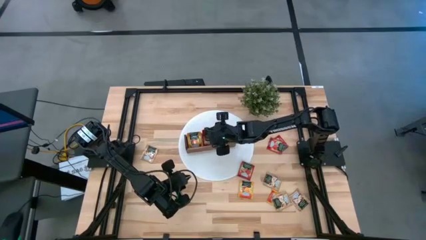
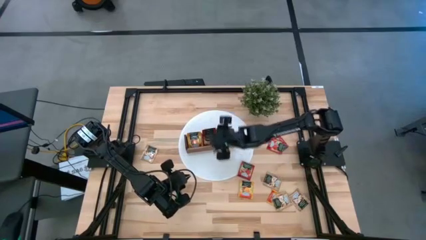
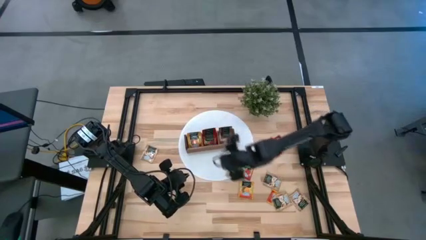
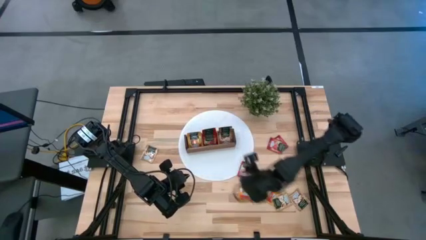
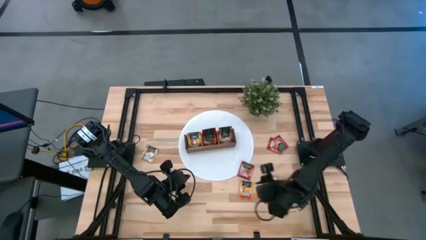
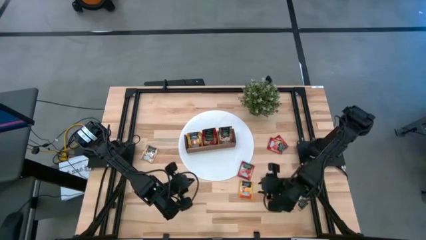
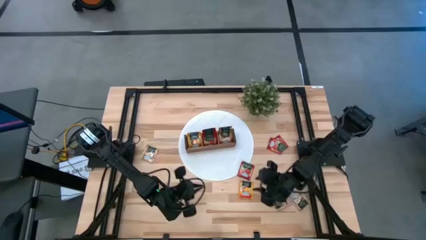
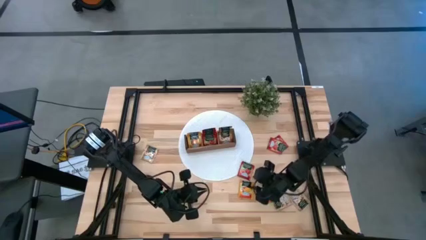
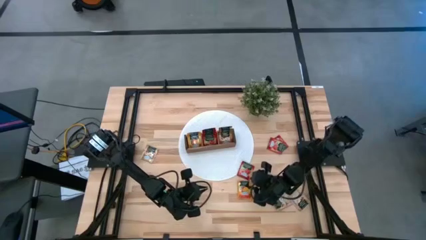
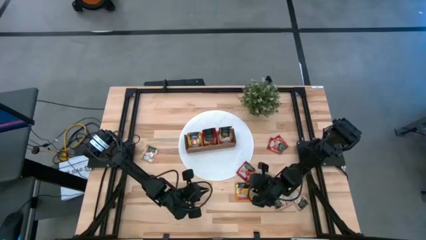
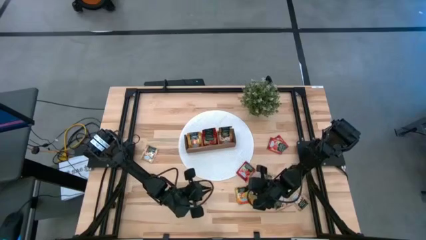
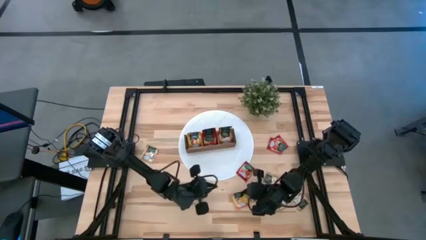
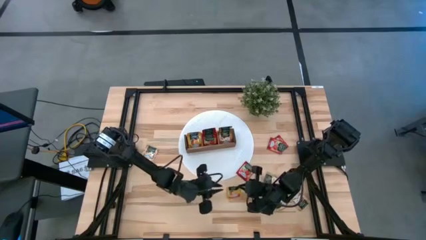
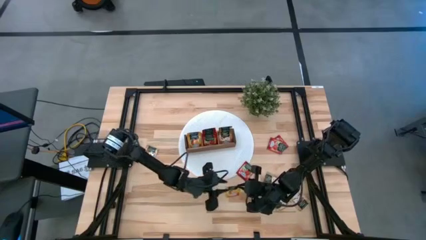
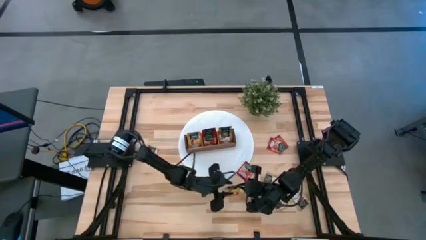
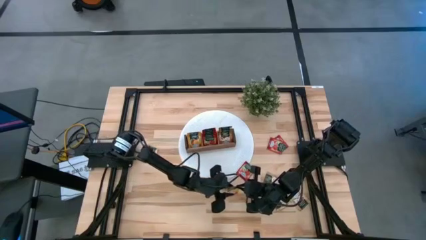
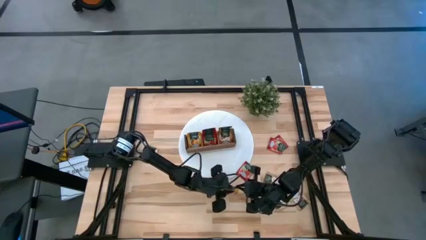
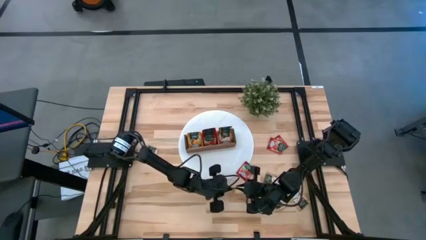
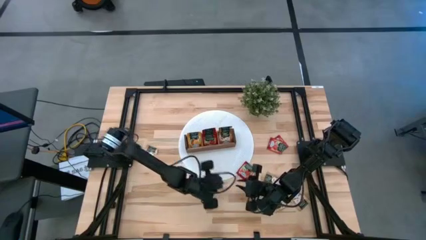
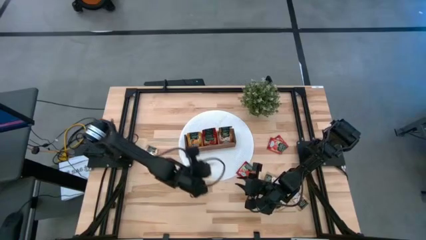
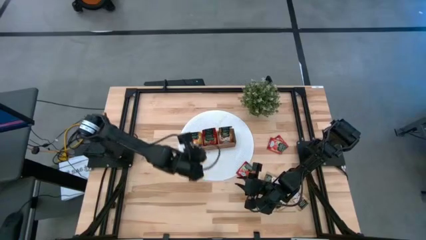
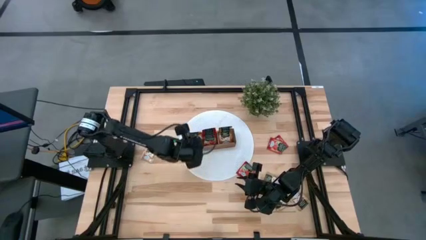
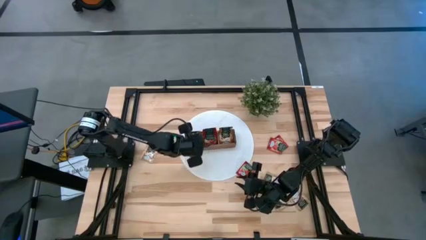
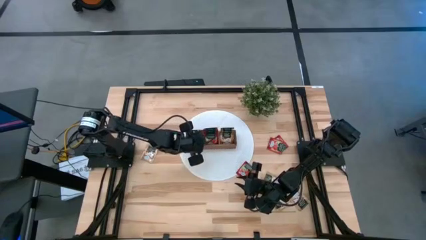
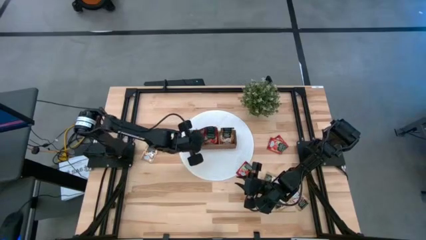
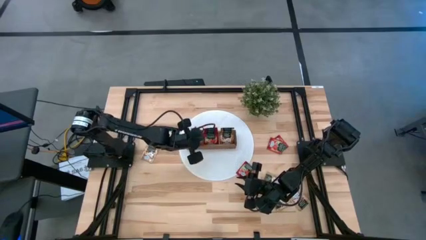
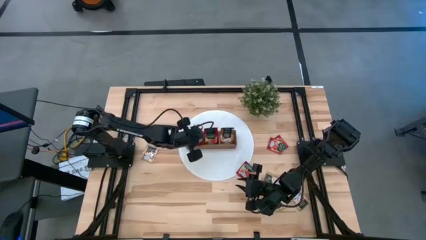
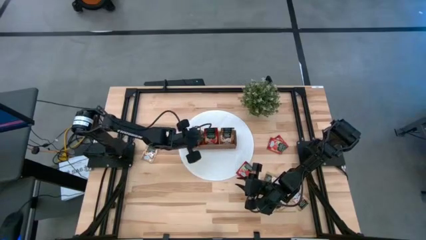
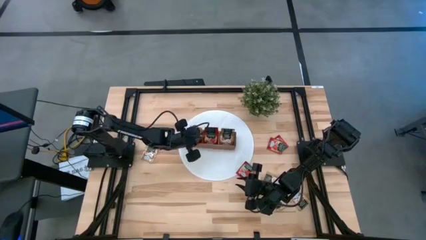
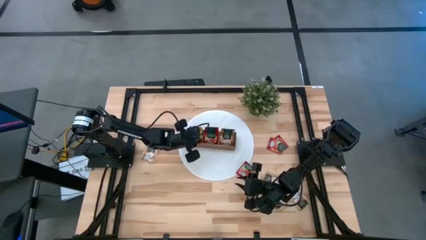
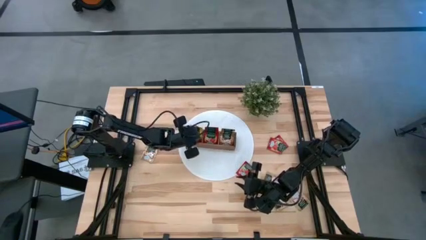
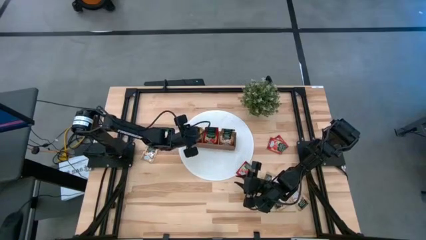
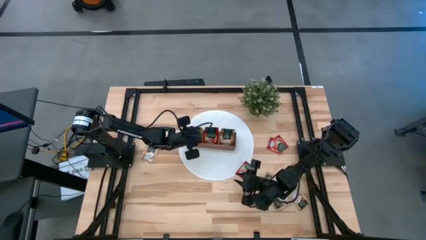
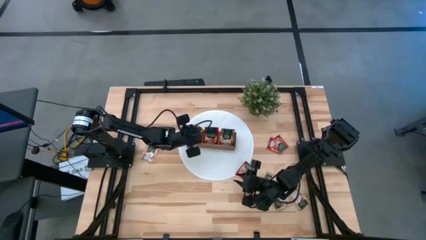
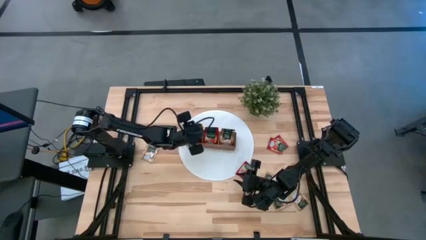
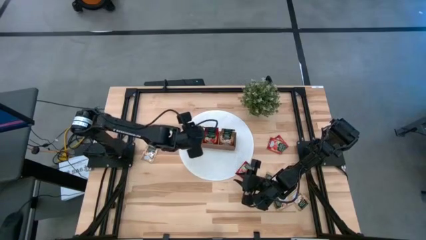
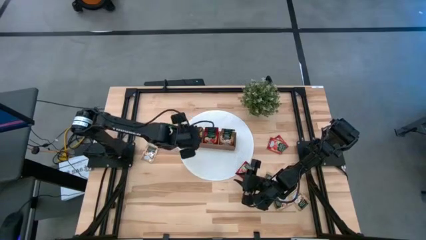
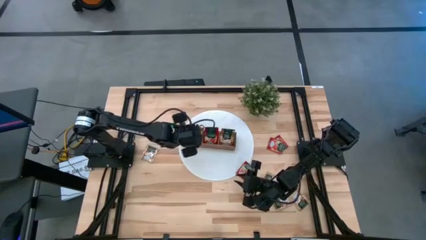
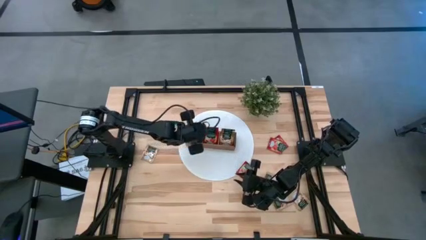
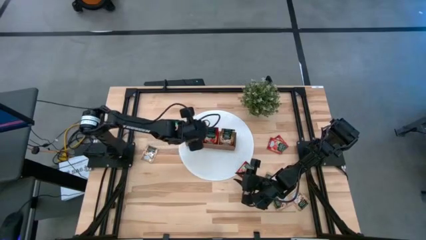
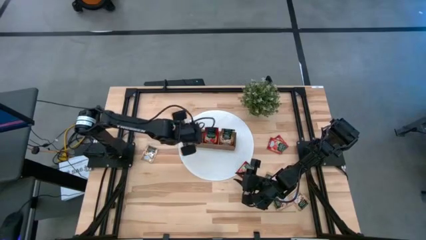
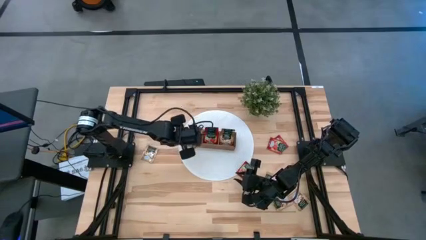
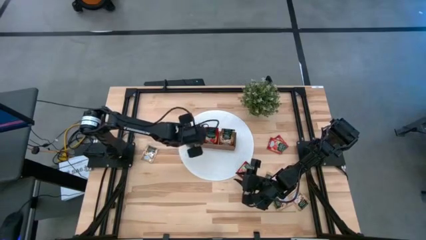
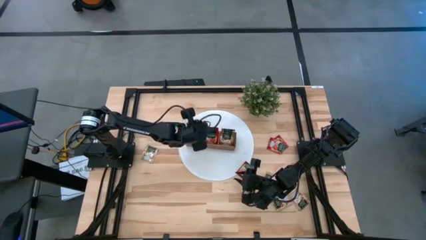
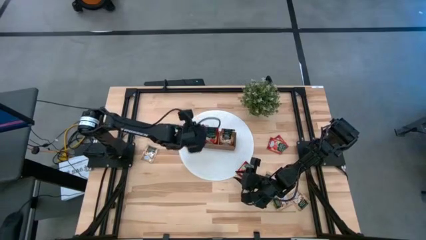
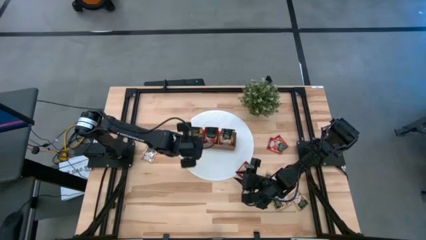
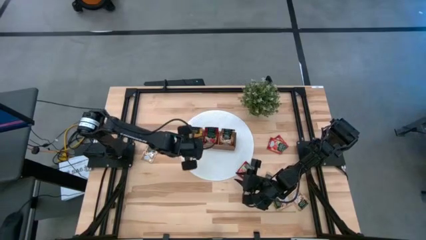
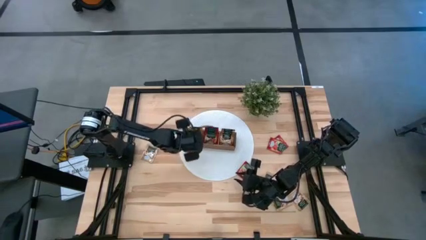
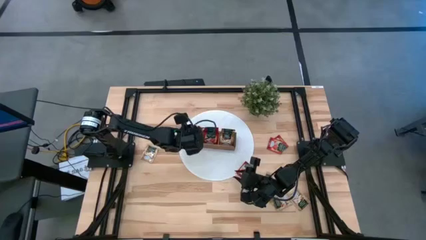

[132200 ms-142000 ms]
Task: Pick & Place Tea
Put the orange tea bag into the left section of the wooden organizer

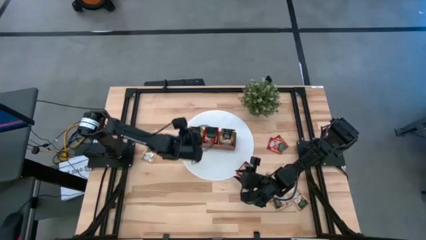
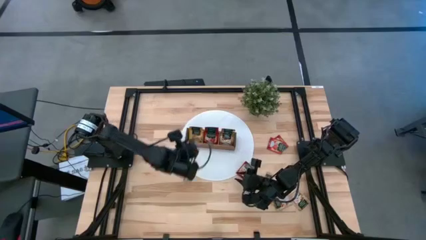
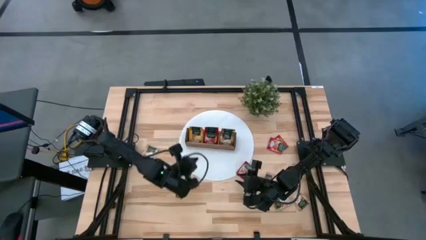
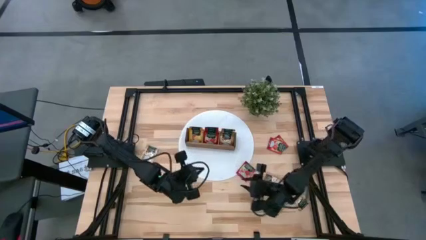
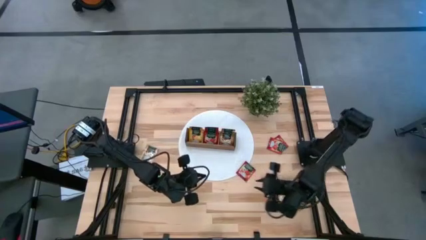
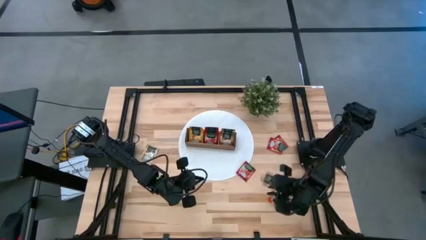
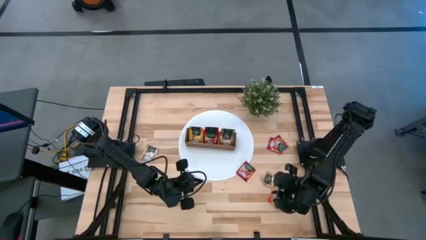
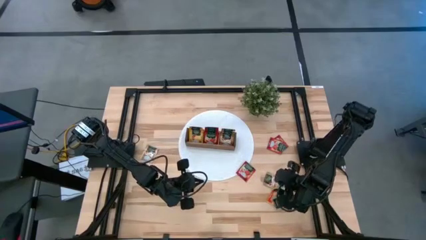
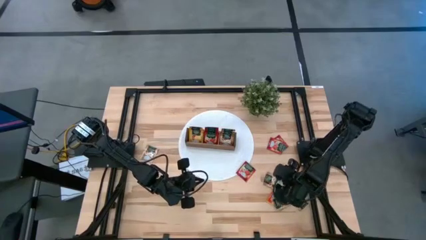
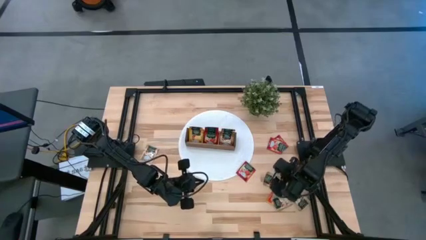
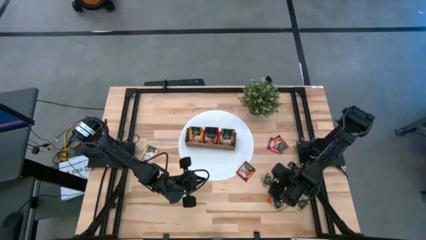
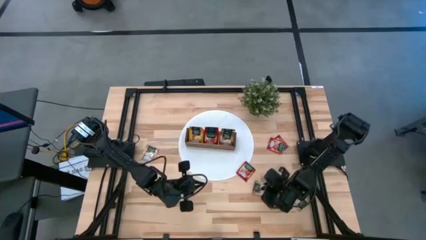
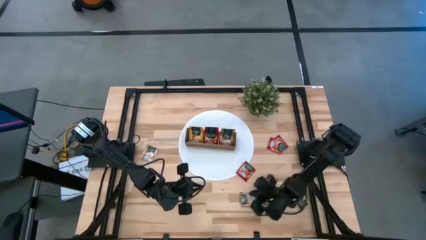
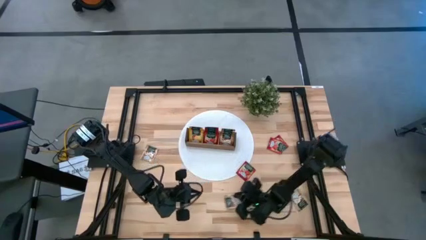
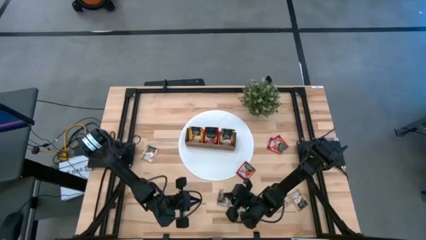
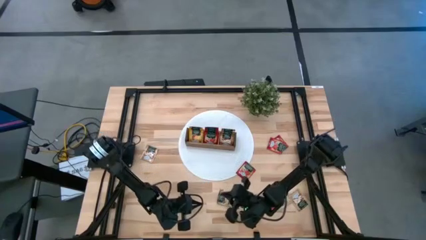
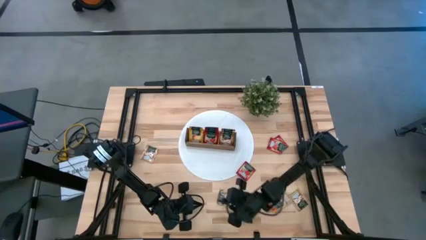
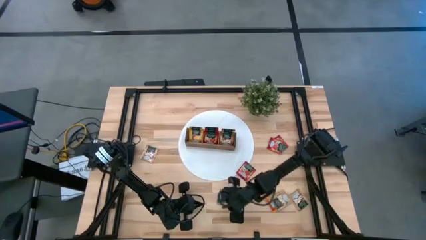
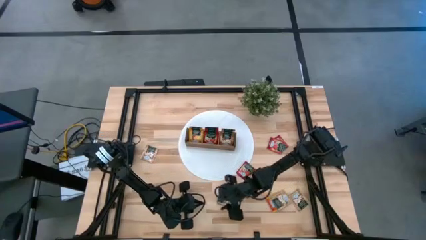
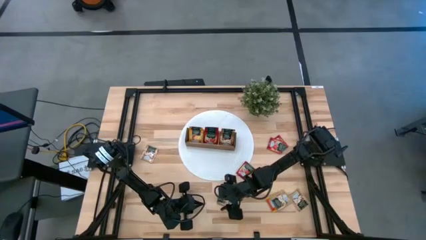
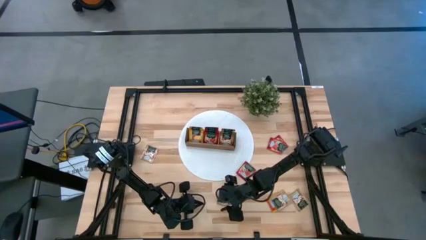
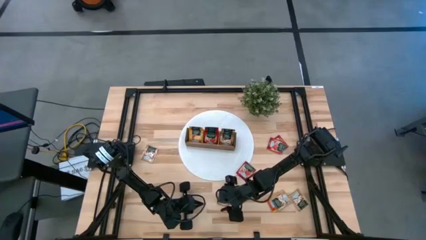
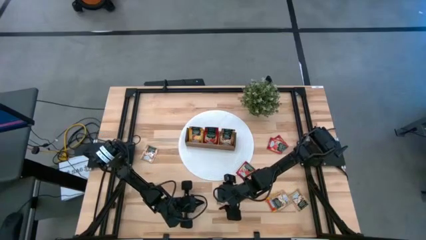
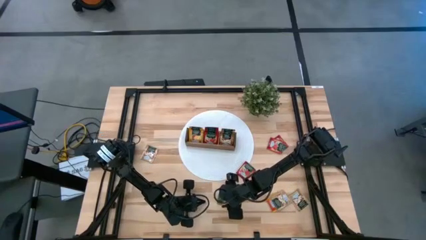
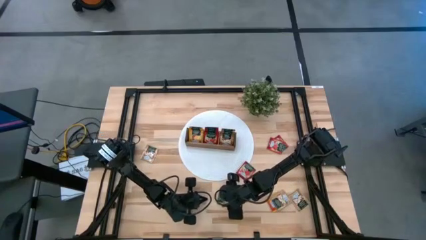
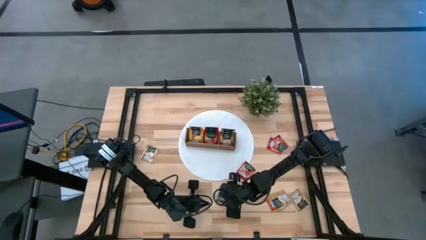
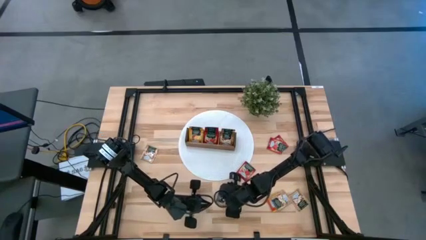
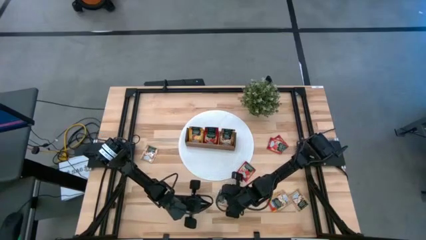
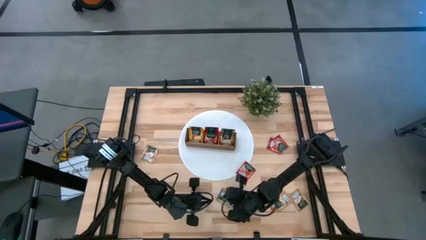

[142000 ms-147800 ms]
Put the brown tea bag into the right section of the wooden organizer
